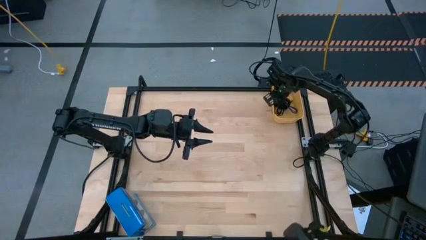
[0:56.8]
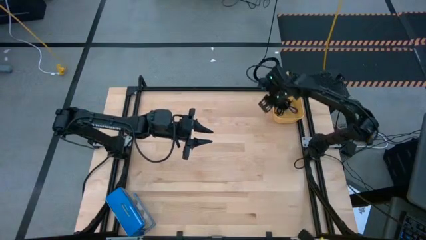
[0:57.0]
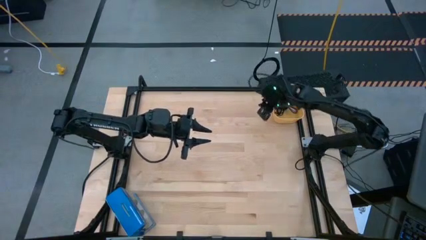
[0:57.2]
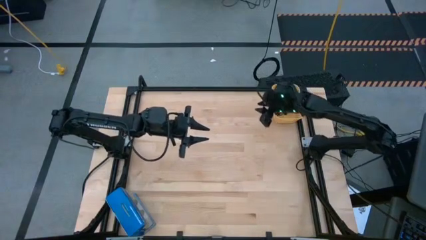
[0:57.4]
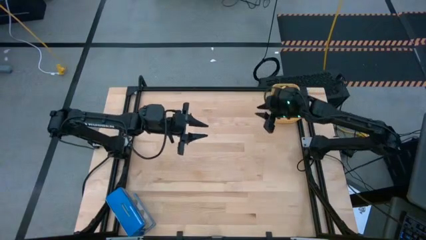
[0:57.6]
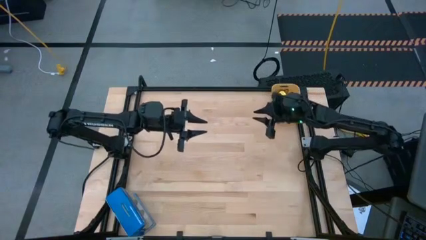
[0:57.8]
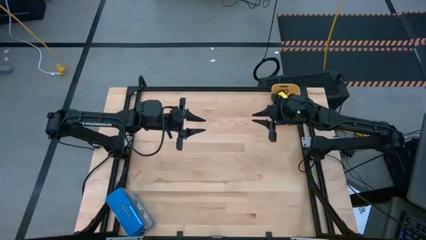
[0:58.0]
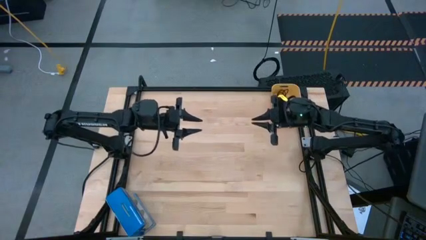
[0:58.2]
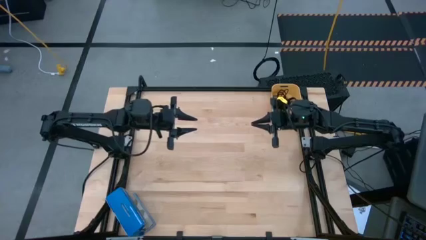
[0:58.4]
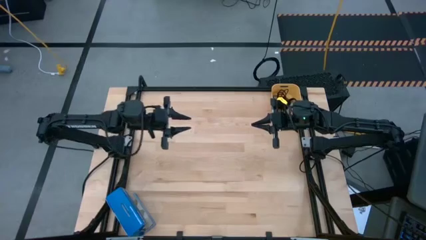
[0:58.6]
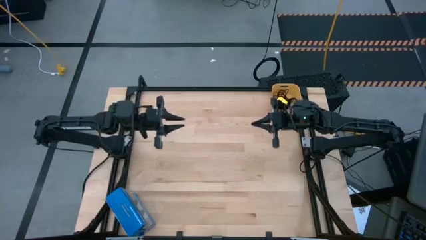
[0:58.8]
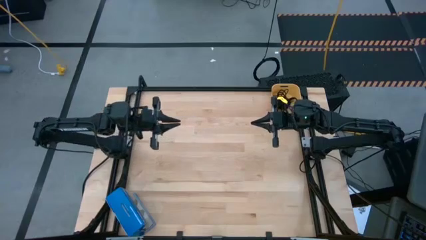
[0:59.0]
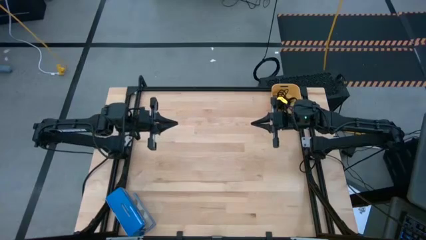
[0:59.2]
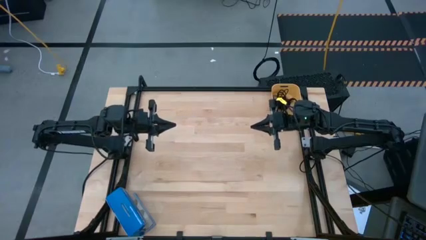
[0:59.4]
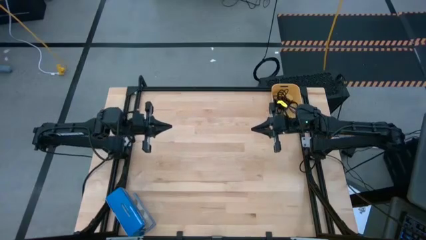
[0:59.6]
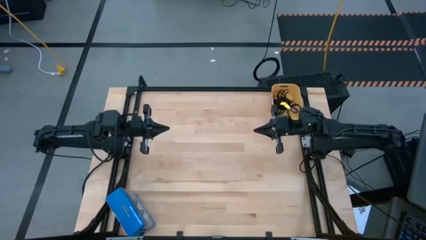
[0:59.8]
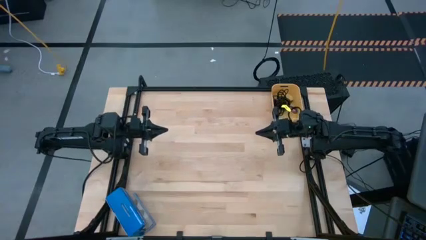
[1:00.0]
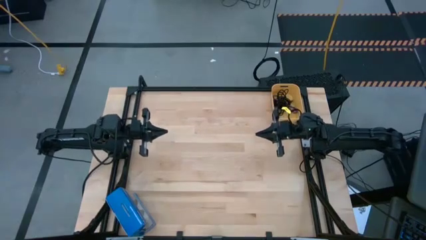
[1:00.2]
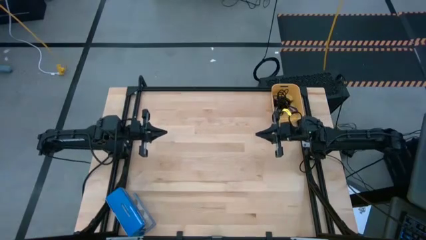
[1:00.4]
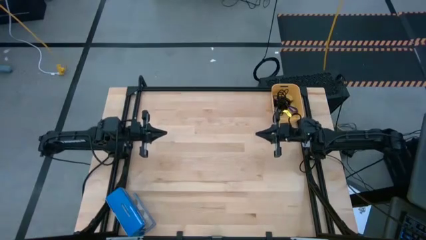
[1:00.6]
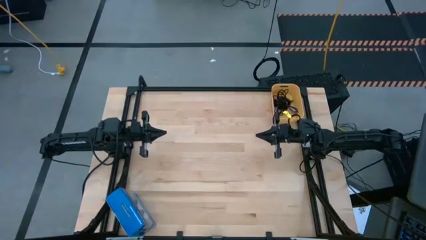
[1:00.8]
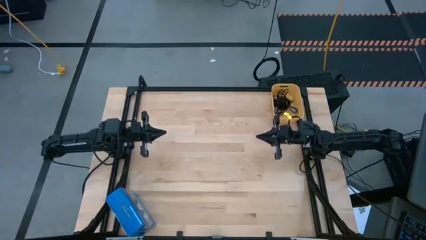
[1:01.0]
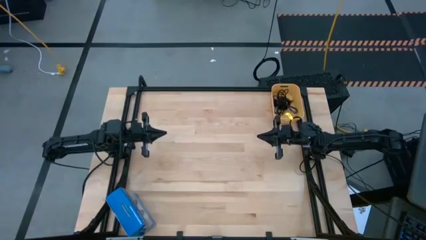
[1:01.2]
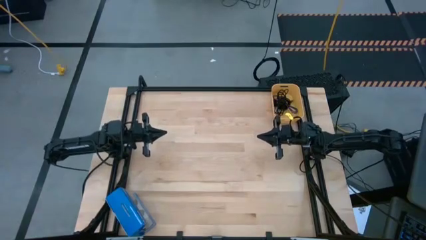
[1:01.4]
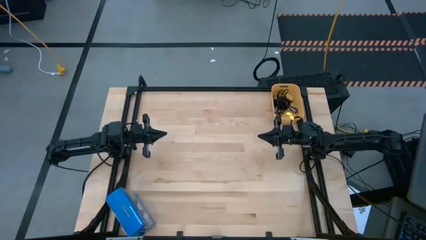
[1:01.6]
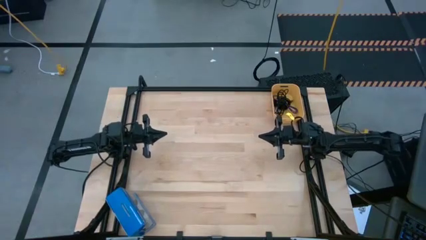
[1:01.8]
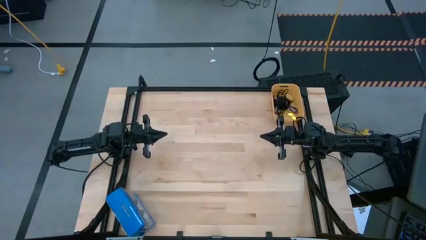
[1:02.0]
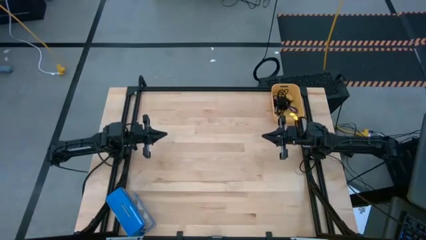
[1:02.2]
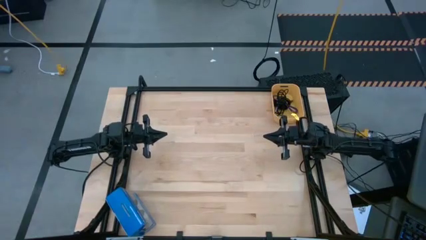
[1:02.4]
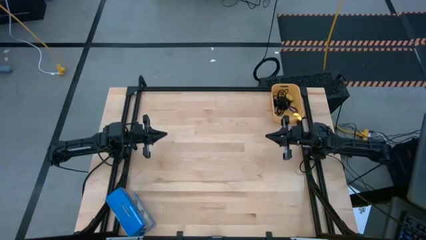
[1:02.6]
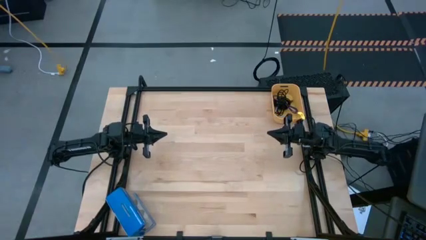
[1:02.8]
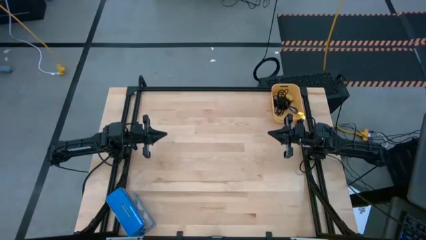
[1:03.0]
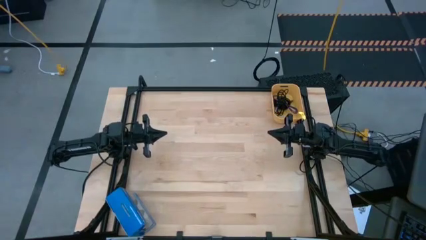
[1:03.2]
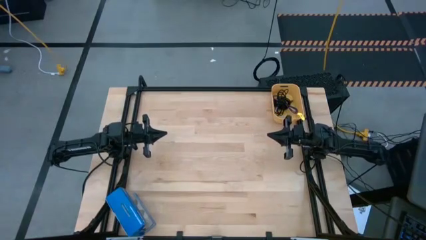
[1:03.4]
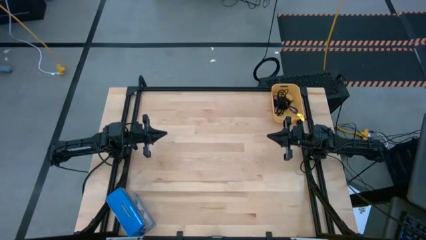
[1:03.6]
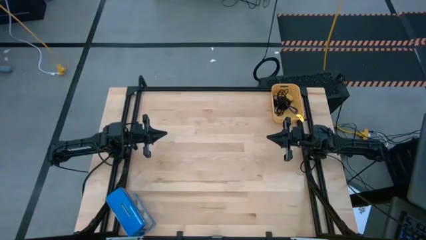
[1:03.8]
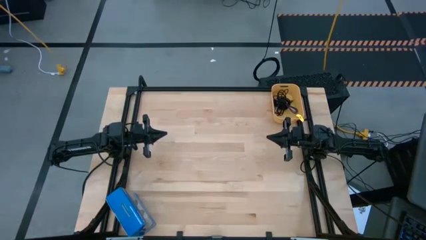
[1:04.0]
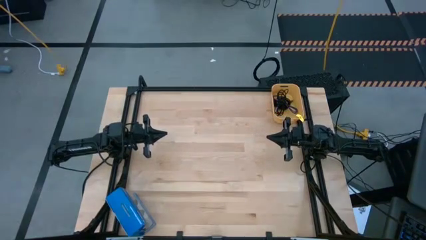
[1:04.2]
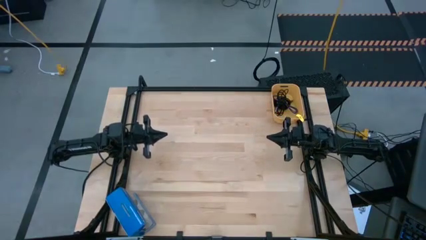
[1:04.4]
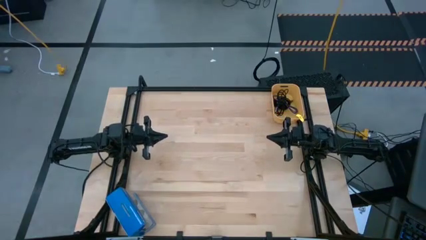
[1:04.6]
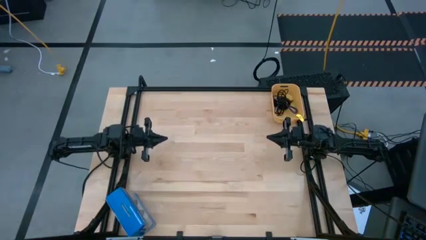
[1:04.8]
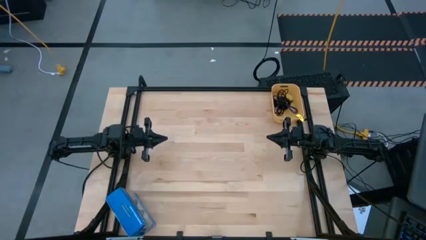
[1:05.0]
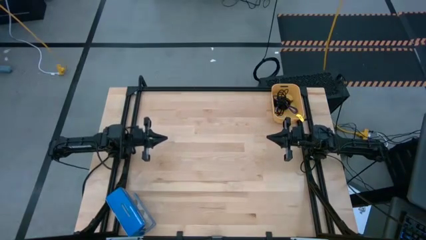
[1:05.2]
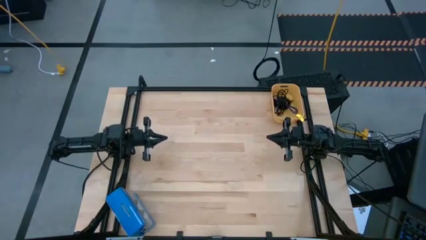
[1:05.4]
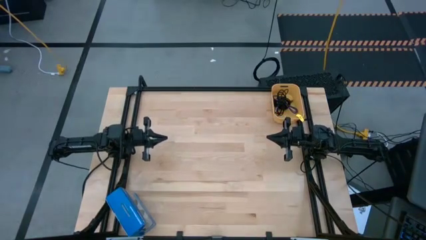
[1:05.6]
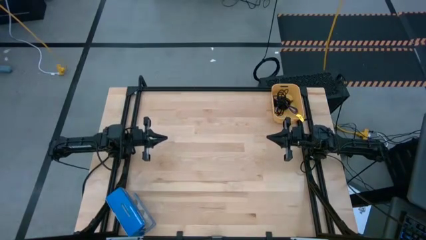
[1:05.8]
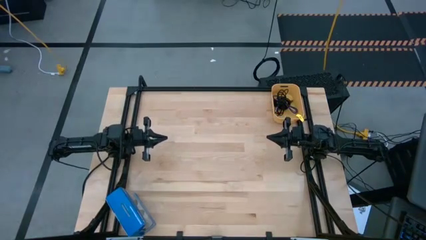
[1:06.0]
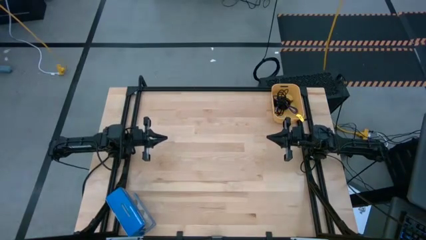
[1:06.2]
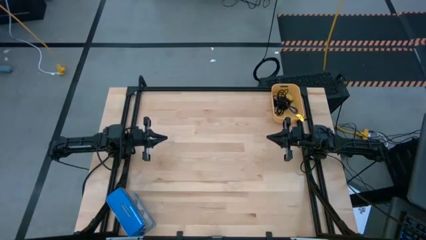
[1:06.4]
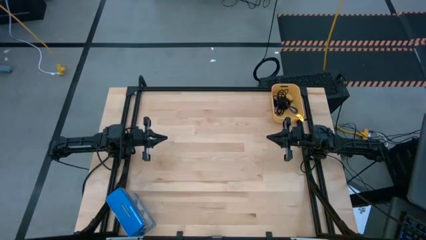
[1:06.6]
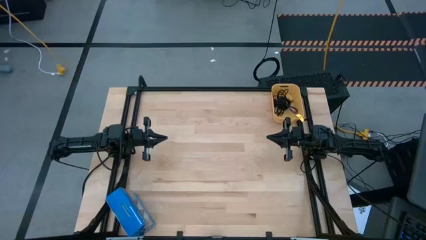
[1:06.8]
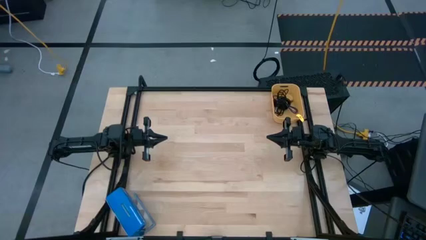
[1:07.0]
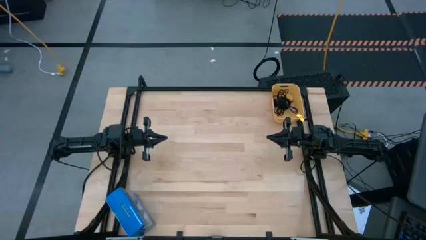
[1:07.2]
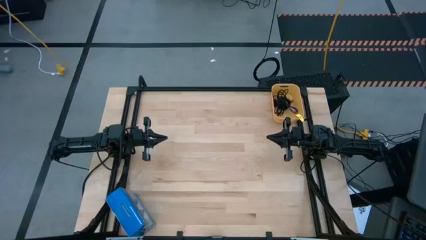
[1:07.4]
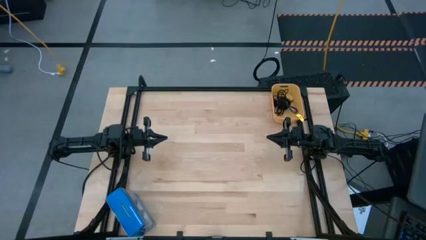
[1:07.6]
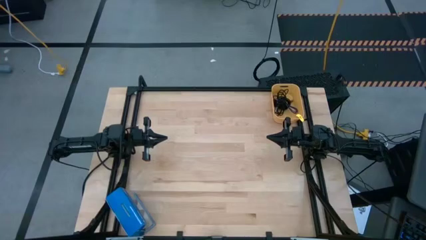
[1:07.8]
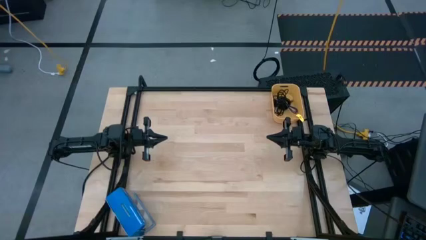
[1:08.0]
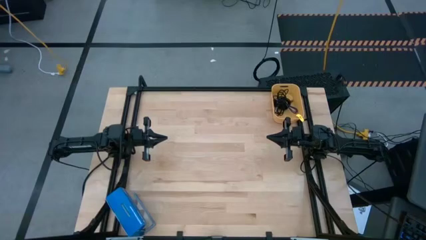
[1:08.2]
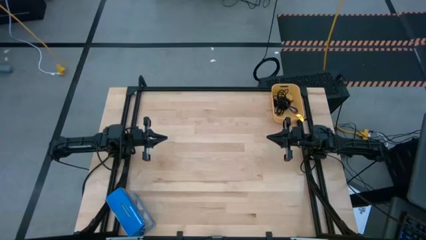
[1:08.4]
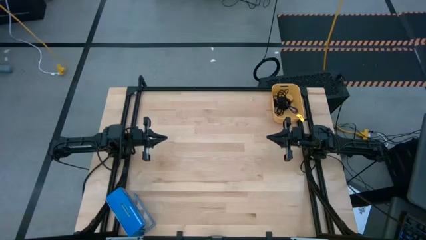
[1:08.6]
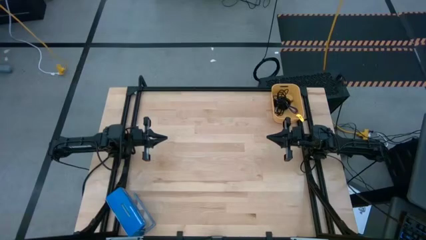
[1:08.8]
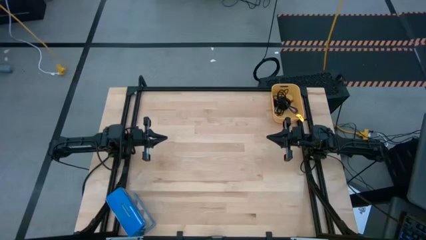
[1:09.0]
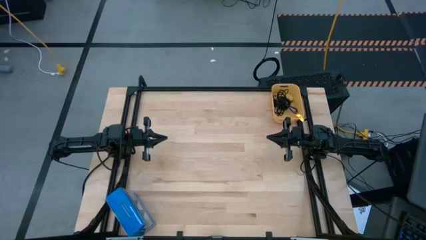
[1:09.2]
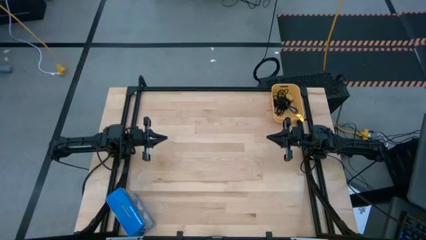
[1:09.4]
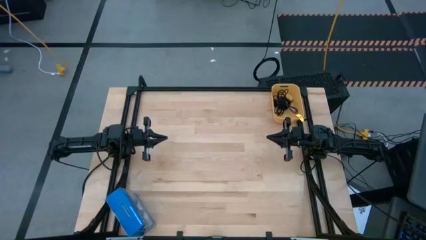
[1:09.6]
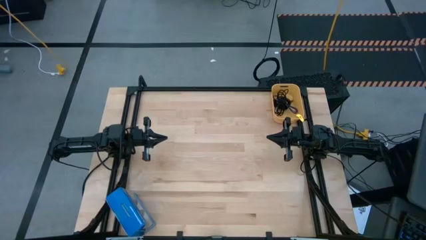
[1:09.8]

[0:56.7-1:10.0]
Task: Pick and place USB-C Cables
Return to Home Position
